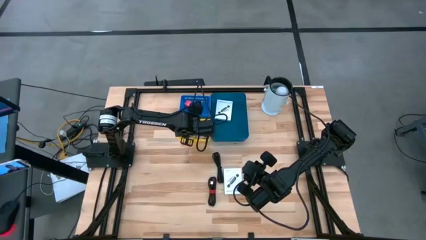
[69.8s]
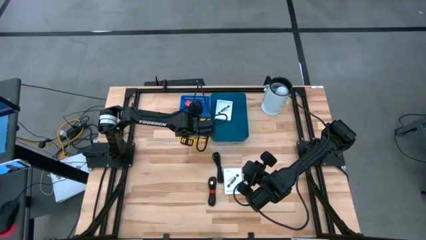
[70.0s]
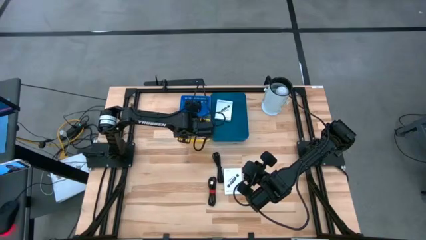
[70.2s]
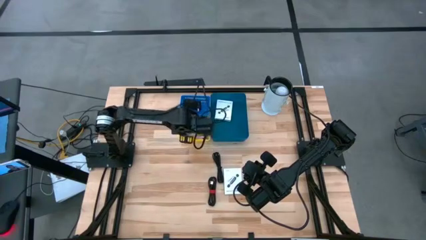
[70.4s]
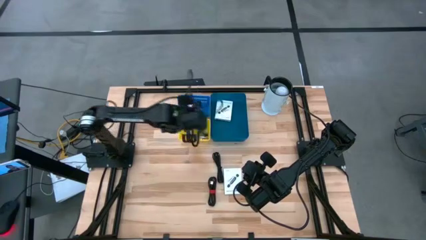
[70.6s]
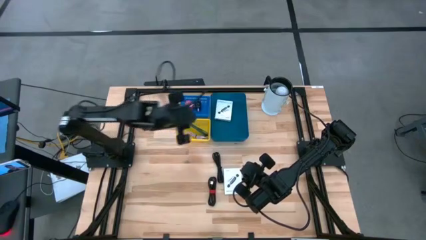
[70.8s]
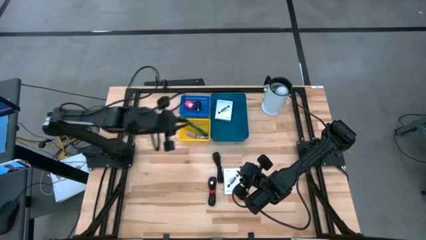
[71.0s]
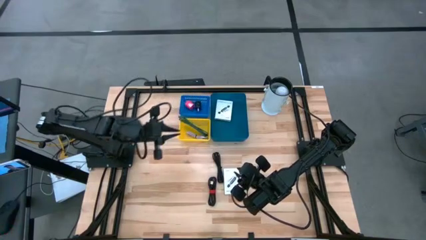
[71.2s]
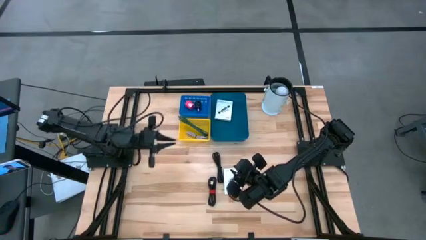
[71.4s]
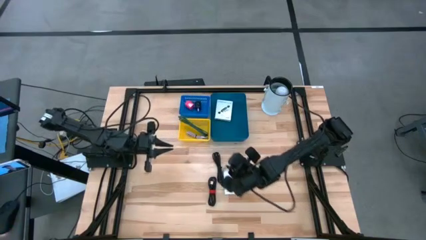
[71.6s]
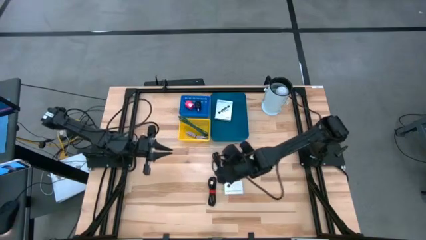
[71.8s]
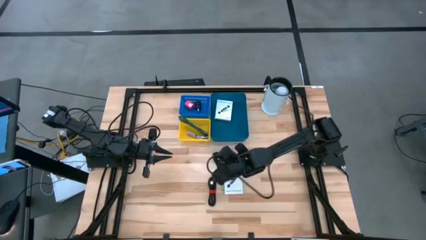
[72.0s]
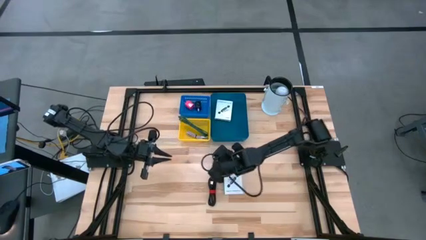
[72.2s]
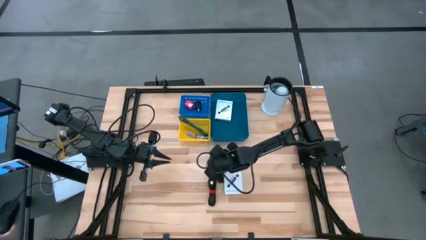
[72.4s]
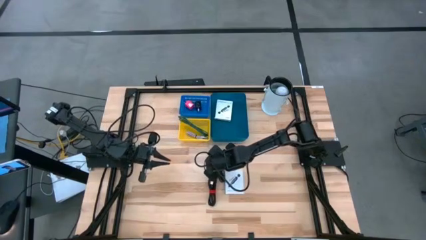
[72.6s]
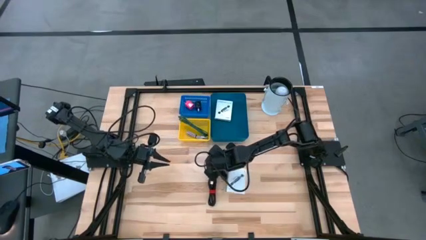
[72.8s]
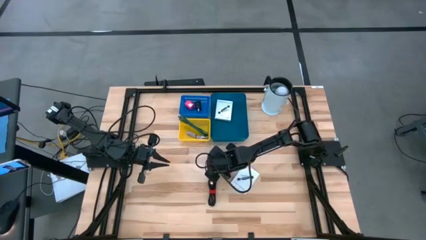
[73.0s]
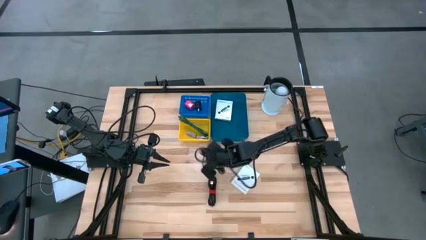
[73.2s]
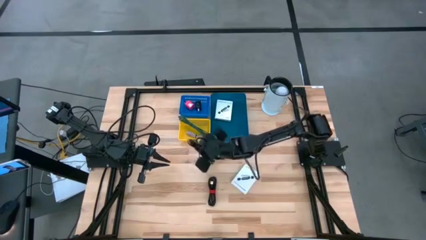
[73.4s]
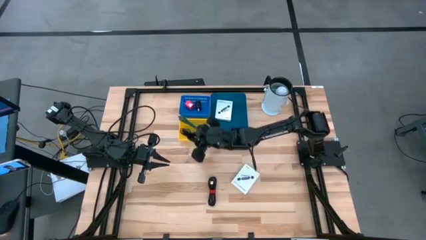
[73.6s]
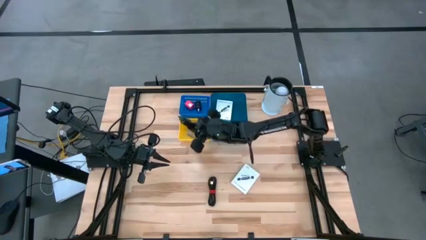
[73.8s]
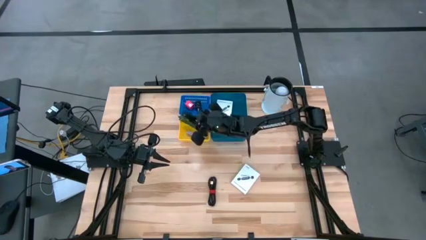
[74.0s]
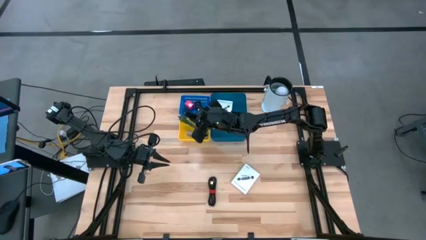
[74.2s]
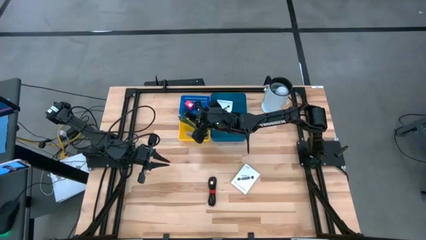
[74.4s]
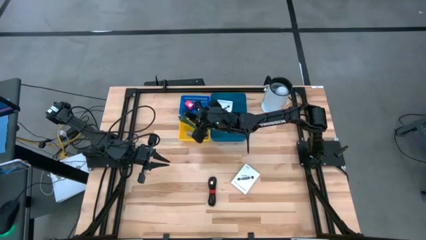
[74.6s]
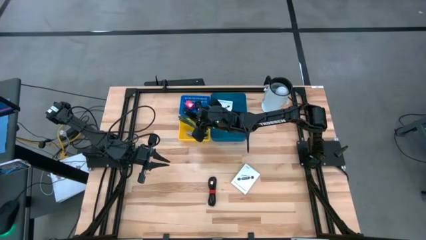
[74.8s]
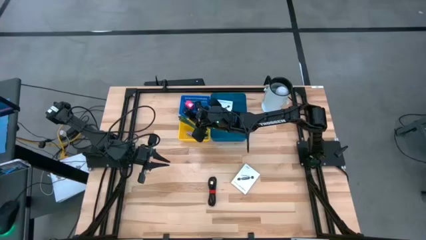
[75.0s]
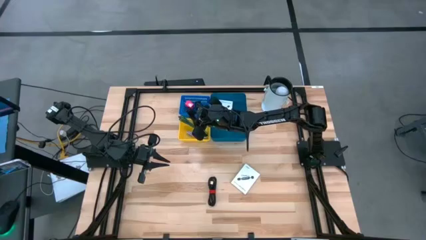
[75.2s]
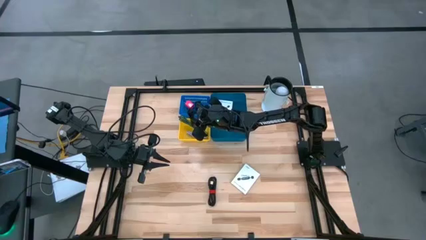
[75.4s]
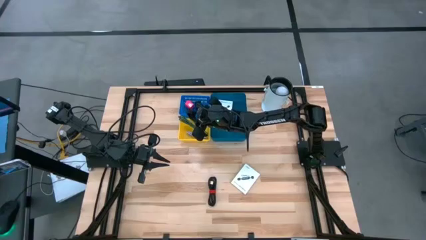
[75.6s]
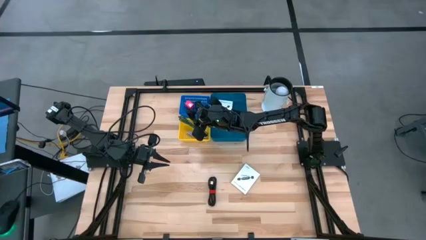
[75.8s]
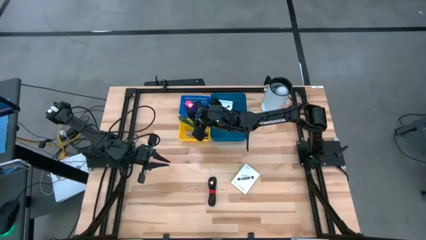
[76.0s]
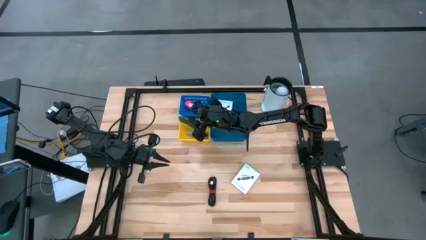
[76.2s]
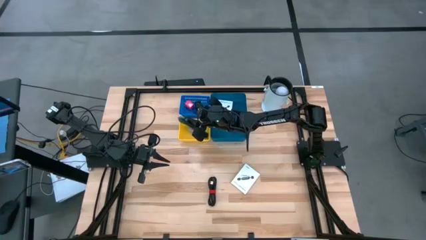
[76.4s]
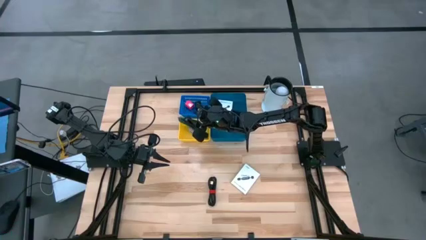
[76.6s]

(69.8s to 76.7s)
Task: Pick and place items into bin
Put the top black USB cable into the yellow basket

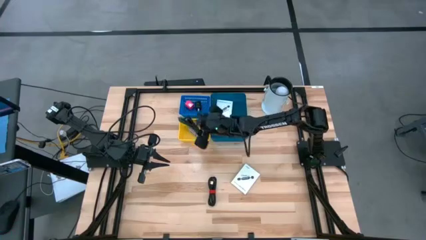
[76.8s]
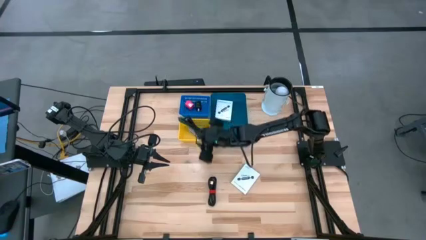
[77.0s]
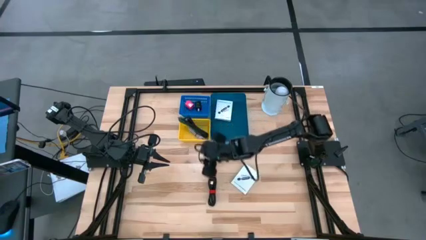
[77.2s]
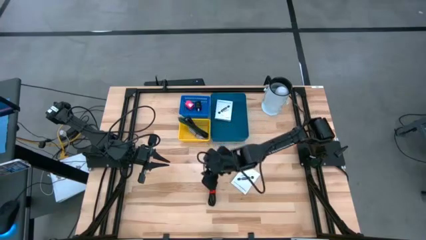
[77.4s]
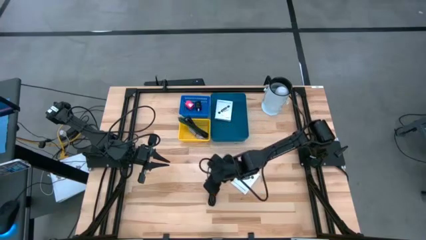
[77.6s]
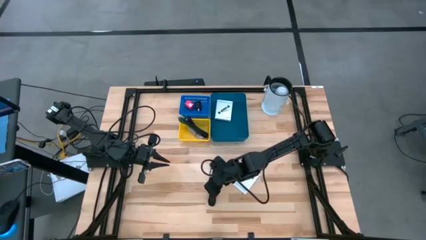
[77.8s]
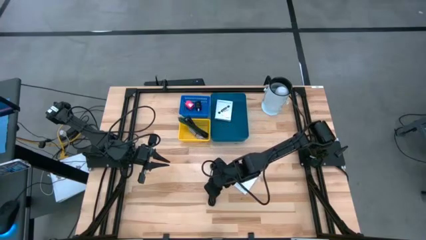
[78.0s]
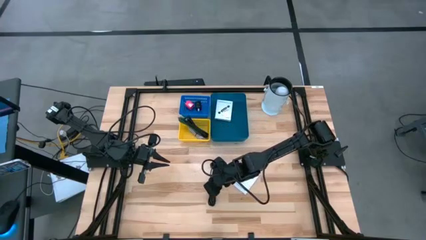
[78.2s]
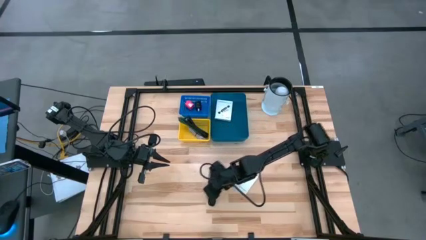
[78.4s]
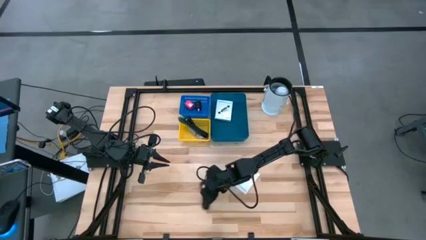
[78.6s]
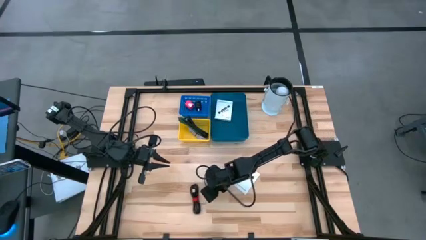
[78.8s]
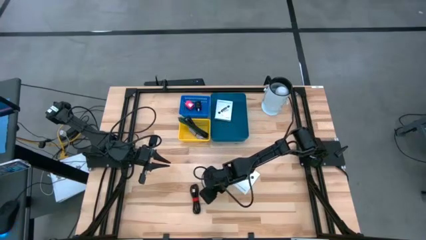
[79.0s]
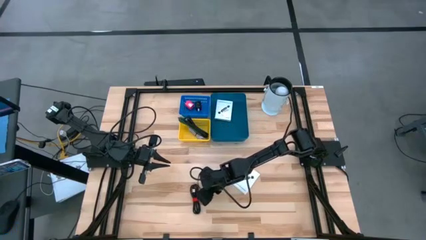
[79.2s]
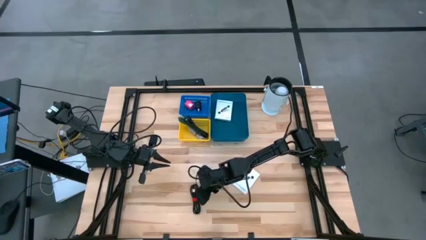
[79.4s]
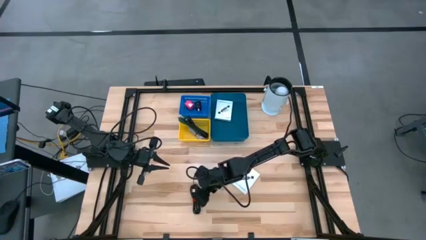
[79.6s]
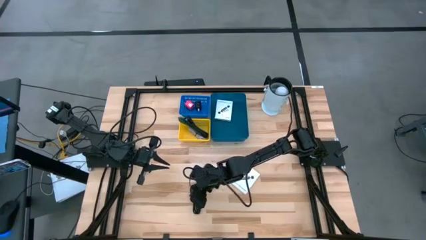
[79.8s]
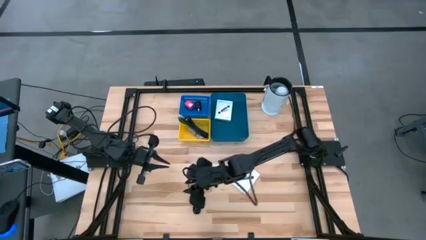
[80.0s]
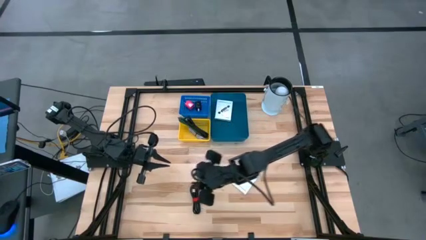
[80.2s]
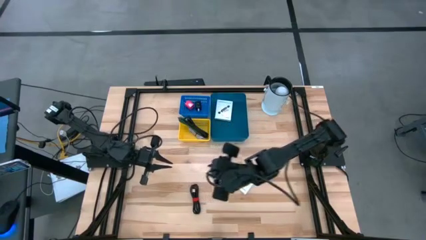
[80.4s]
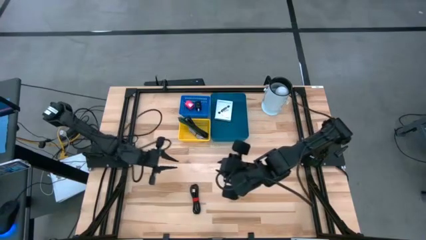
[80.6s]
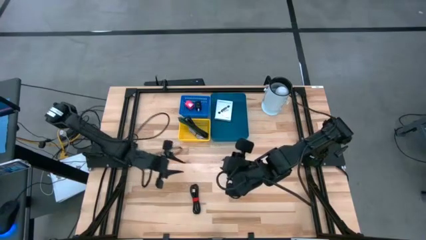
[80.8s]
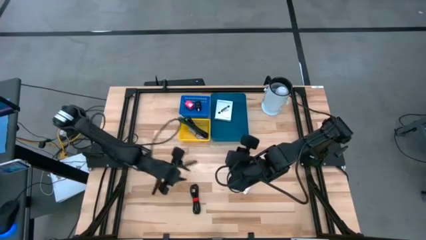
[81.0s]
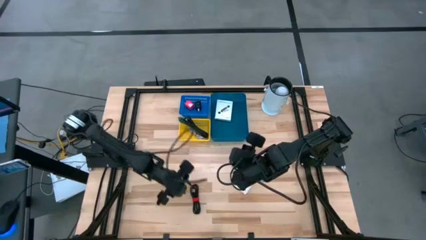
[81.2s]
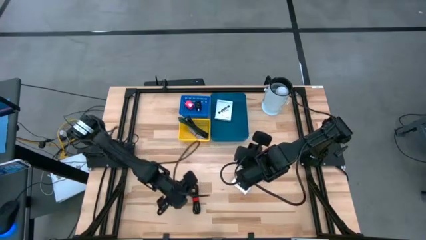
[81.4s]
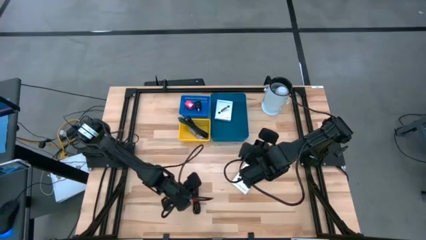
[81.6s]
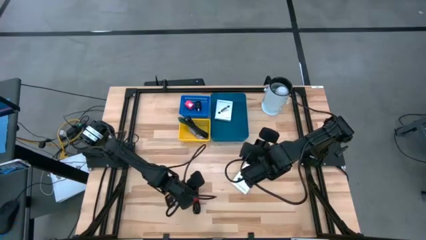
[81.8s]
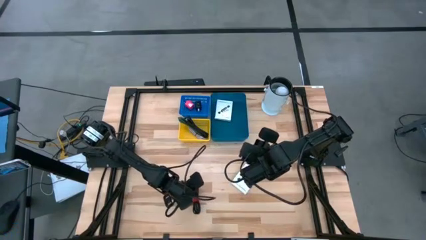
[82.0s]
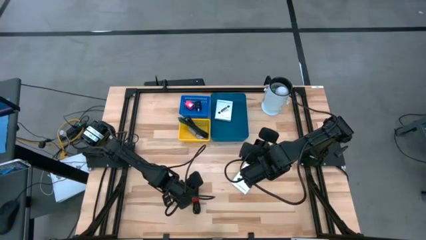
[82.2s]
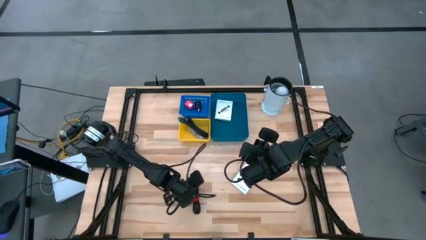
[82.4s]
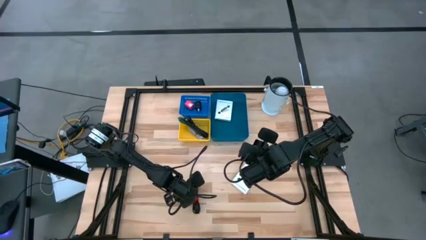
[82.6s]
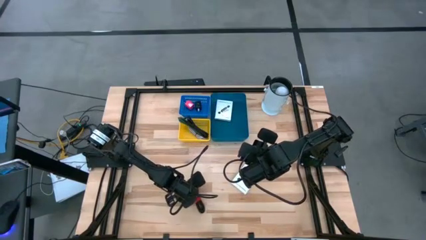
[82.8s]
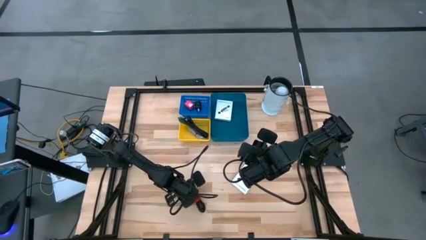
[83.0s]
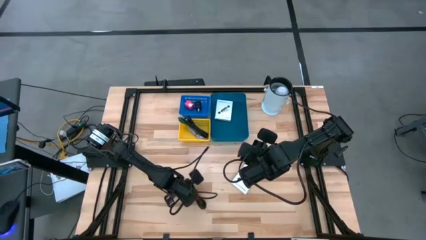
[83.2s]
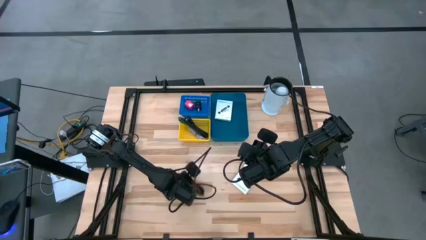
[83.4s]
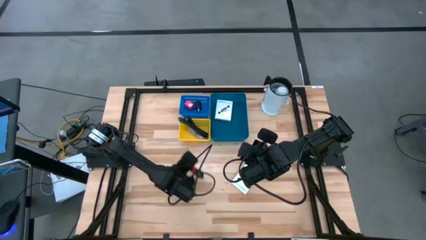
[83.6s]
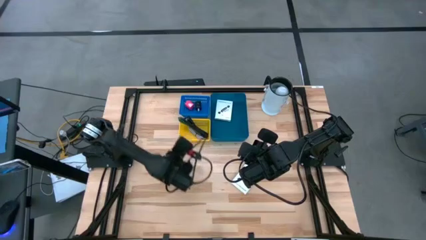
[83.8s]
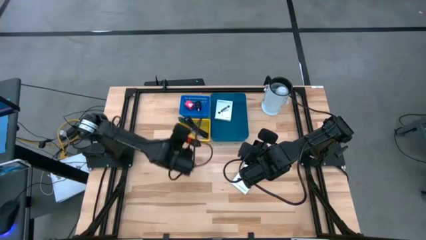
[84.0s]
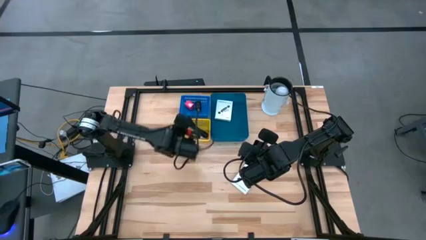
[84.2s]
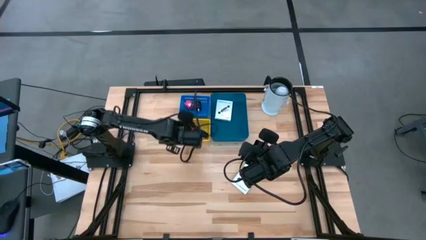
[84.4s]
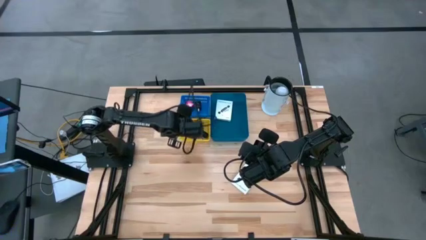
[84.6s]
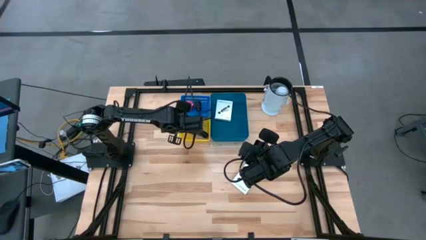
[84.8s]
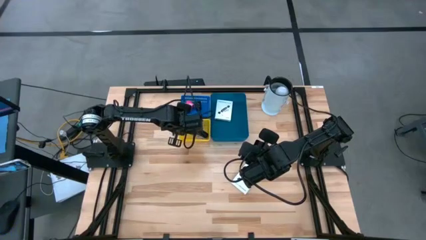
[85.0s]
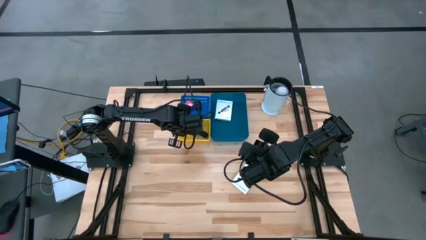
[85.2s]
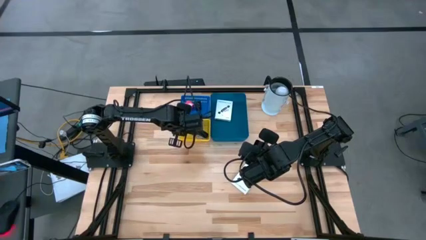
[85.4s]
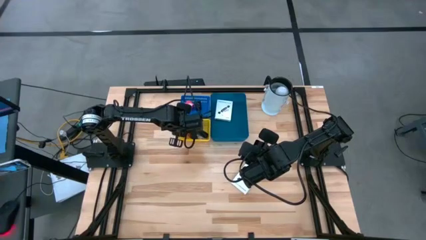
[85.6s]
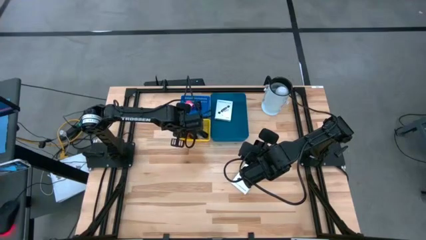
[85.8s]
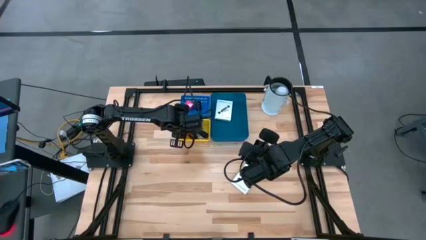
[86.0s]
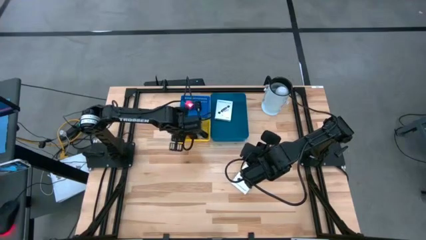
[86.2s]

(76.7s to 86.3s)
Put the black USB cable into the yellow basket
